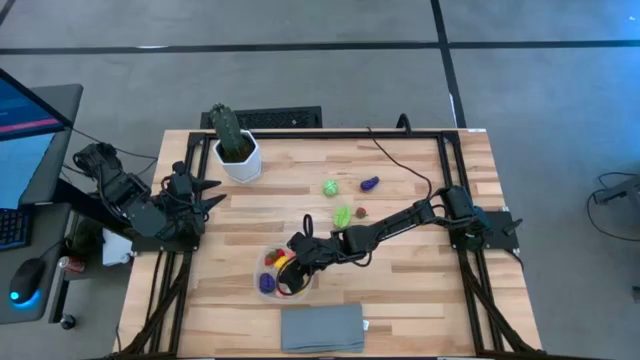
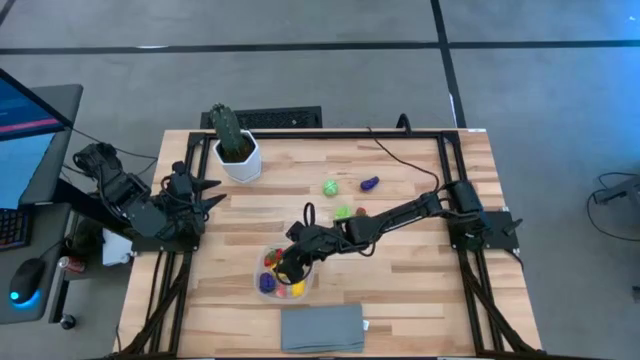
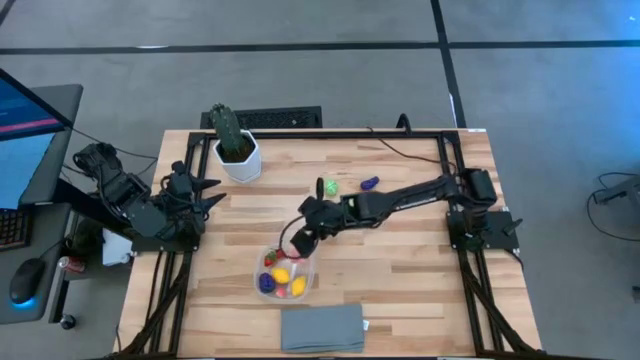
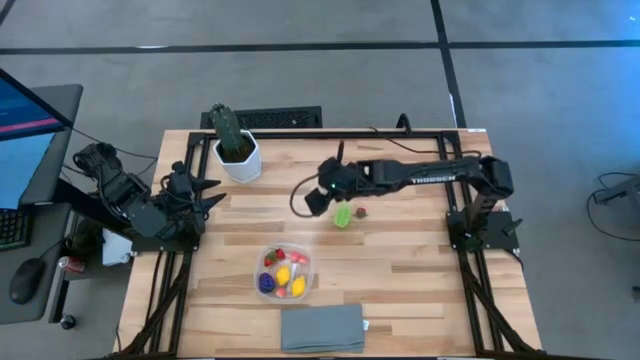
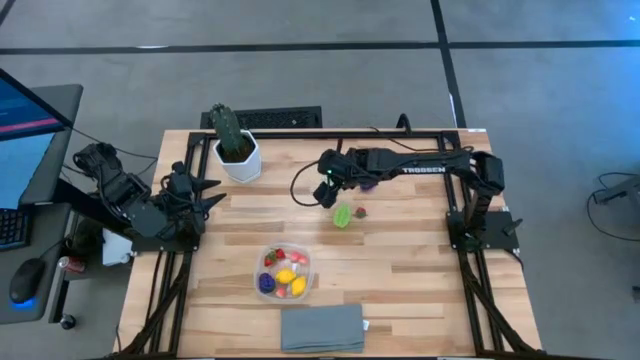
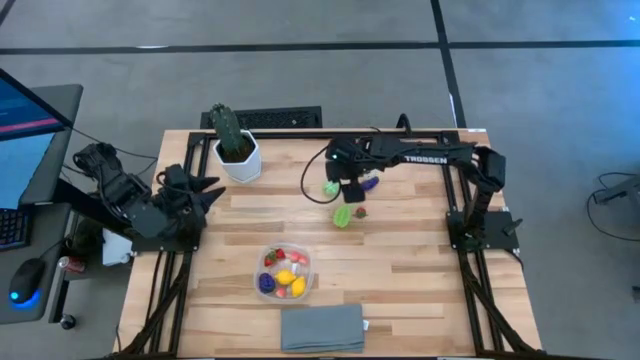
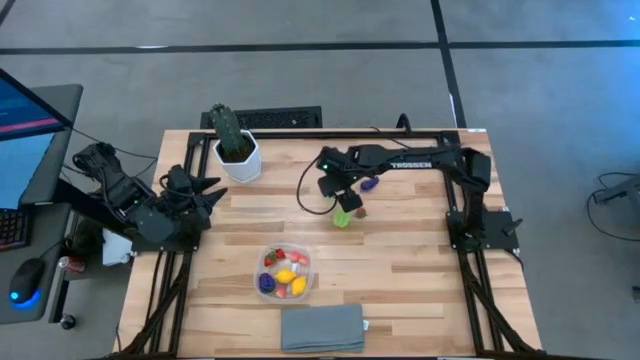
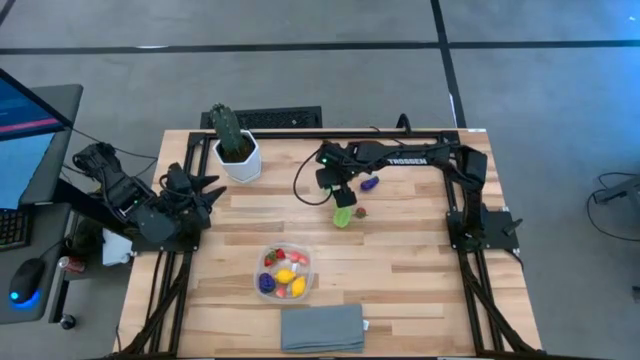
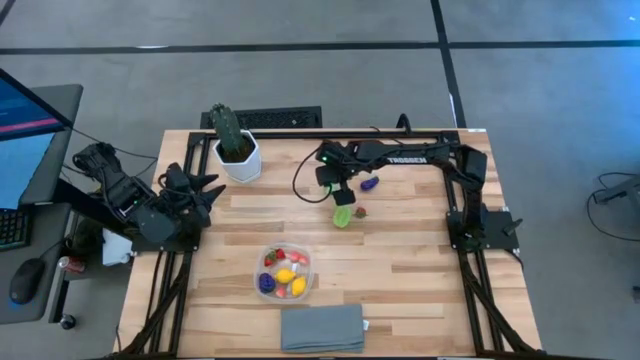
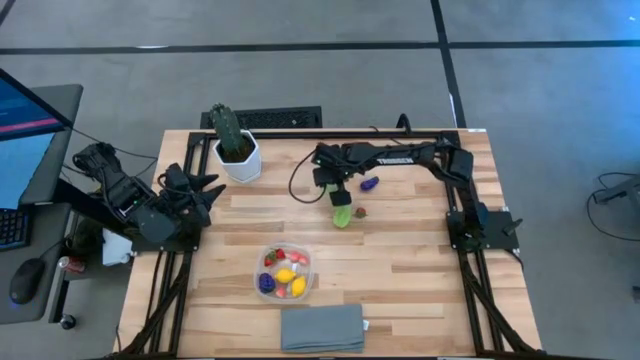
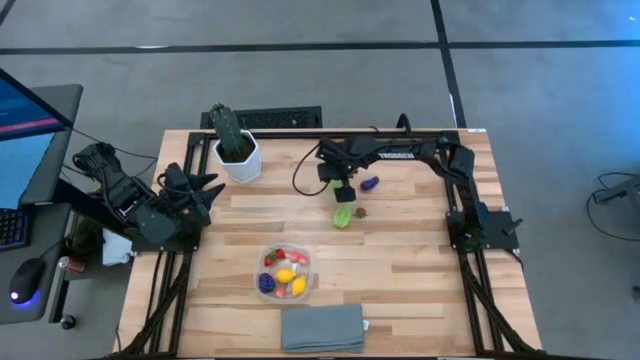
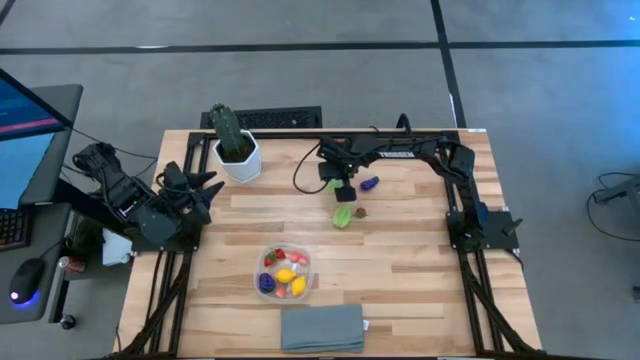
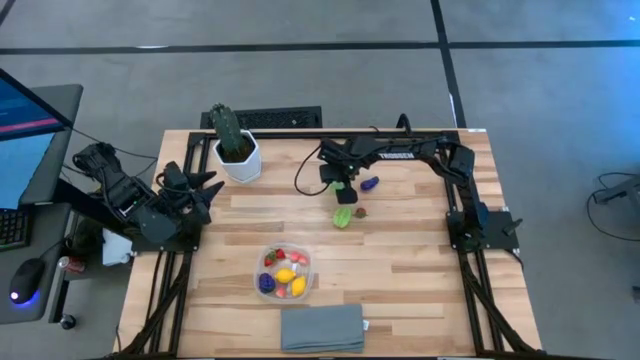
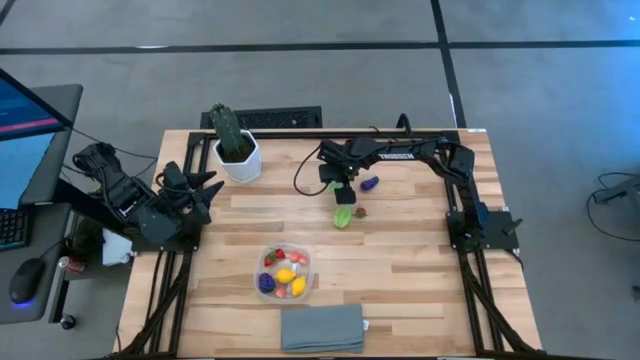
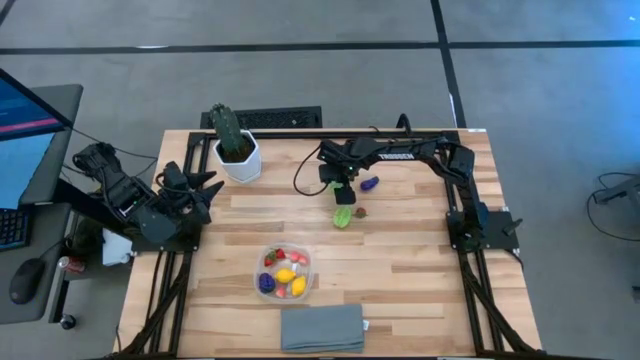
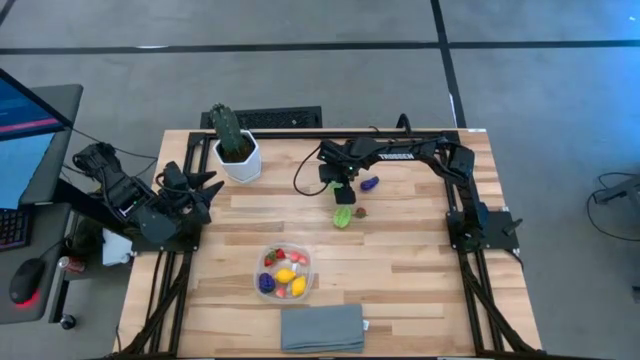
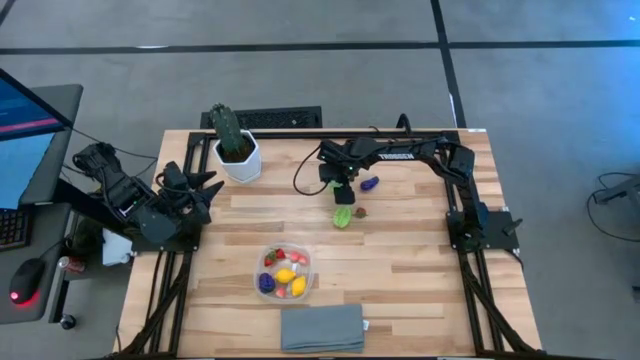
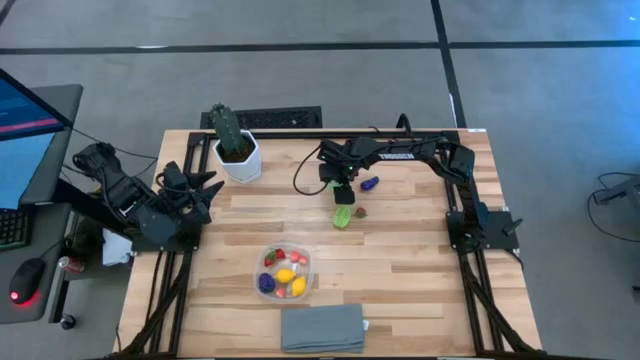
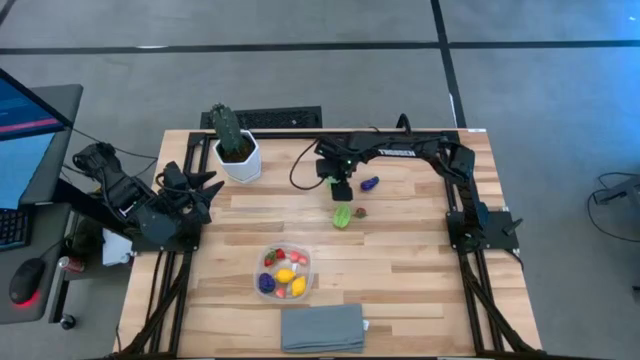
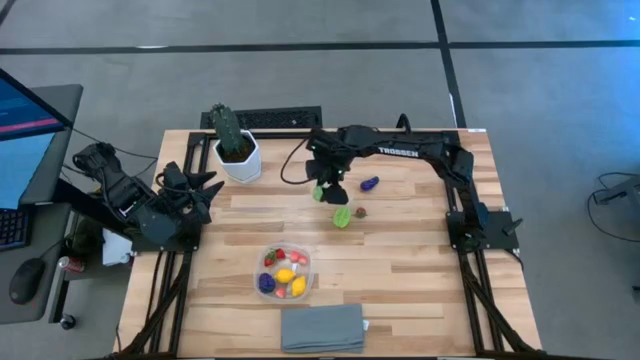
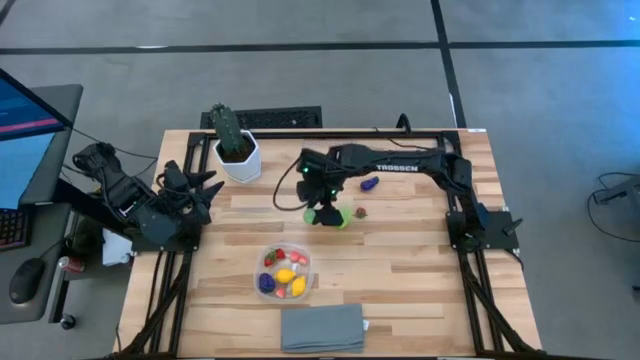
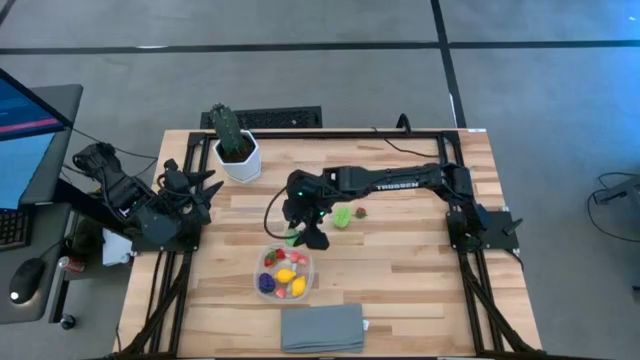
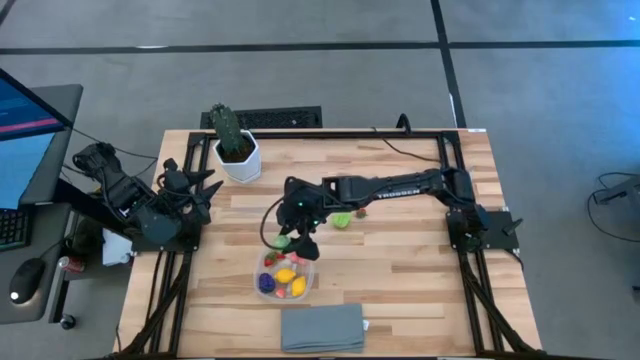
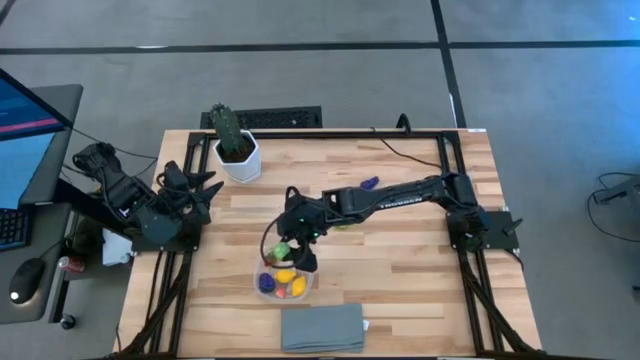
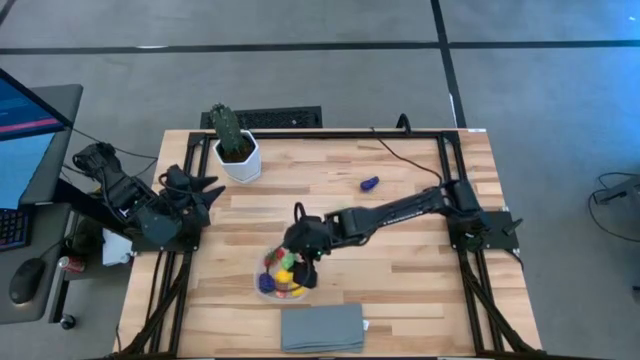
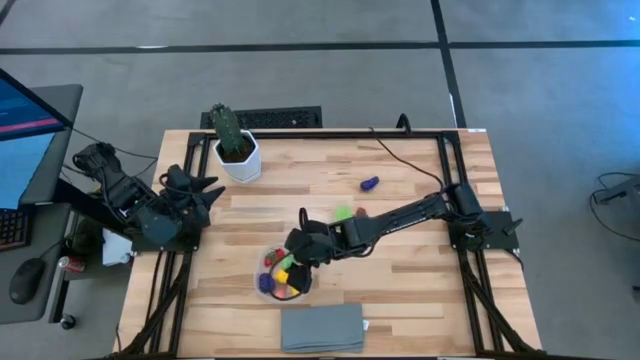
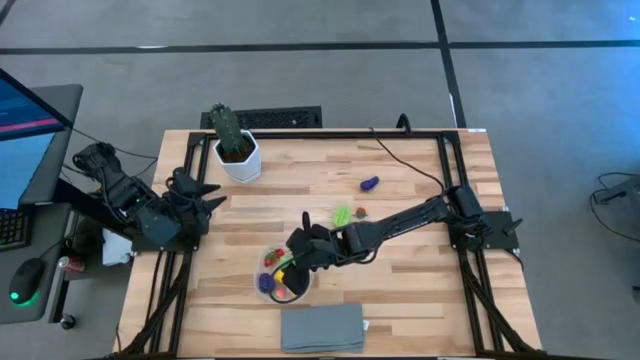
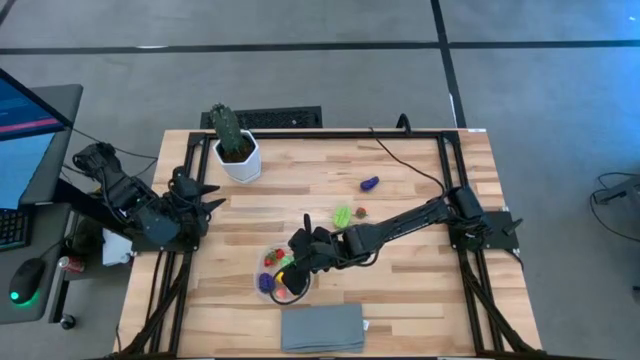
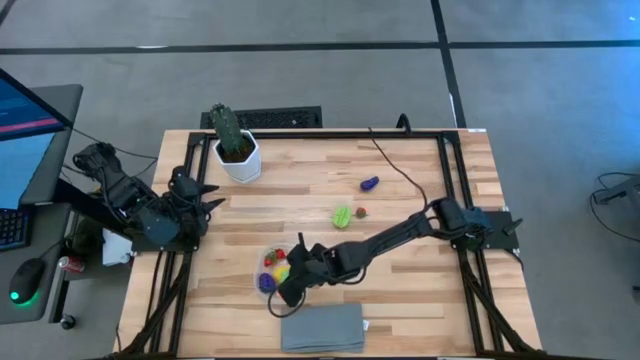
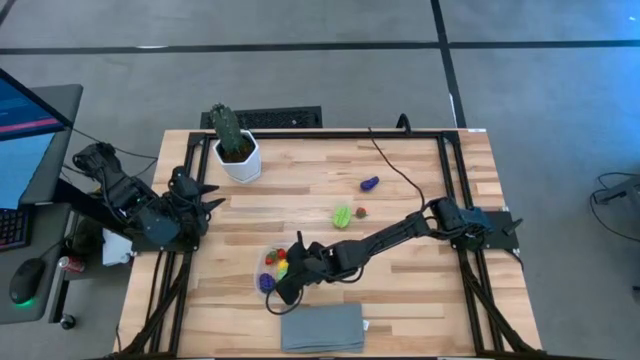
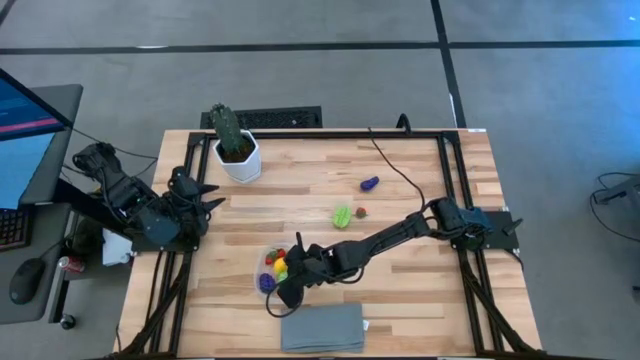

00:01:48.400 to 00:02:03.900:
Task: Pick and placing Produce into tupperware
Put the cabbage into the transparent bin

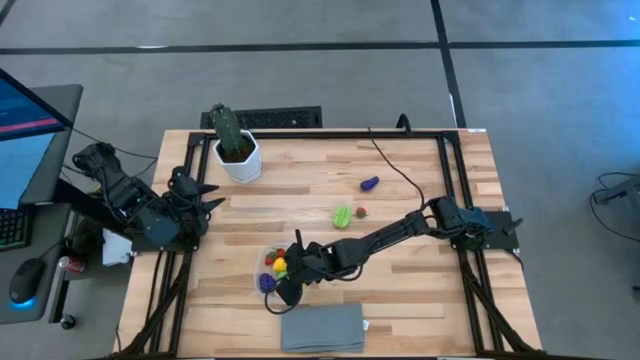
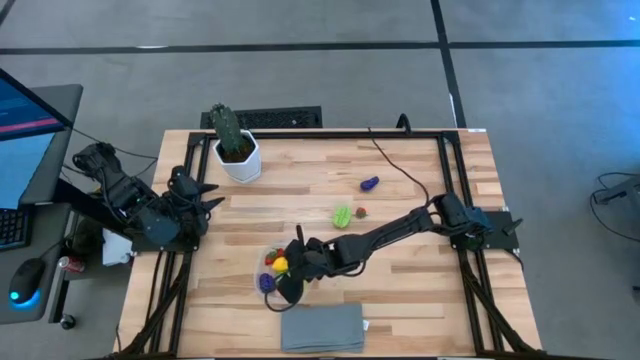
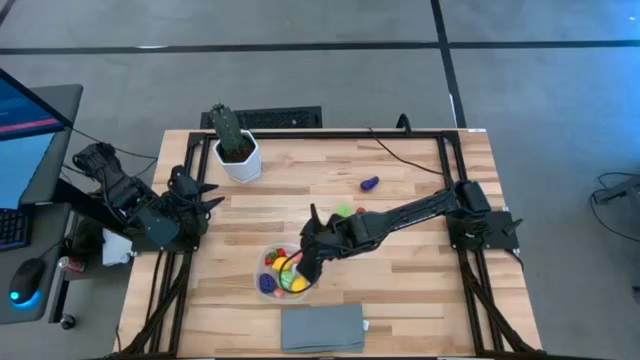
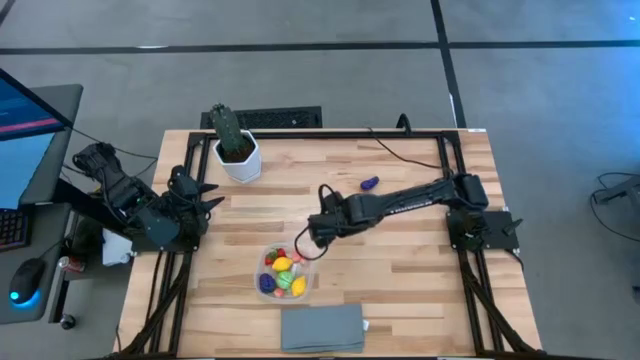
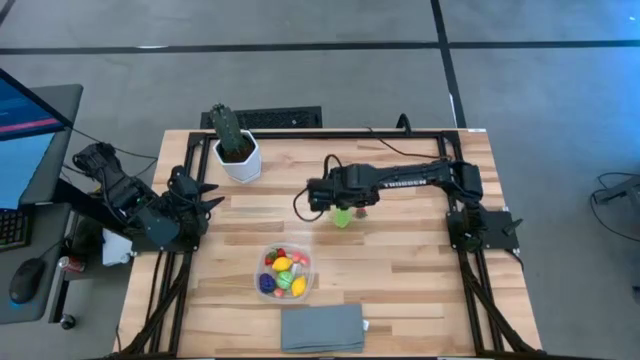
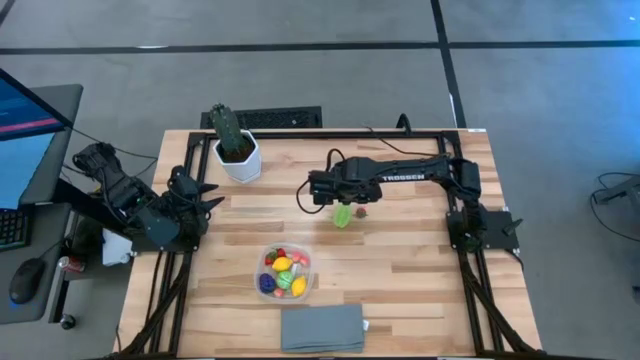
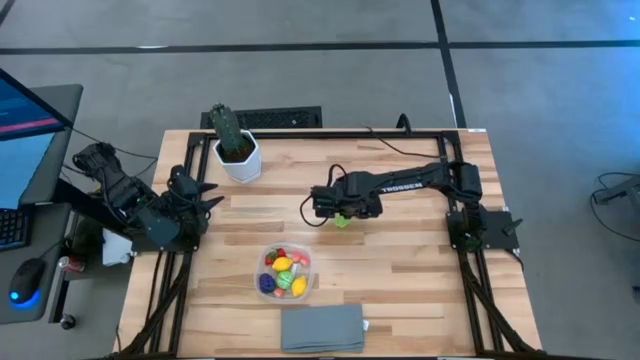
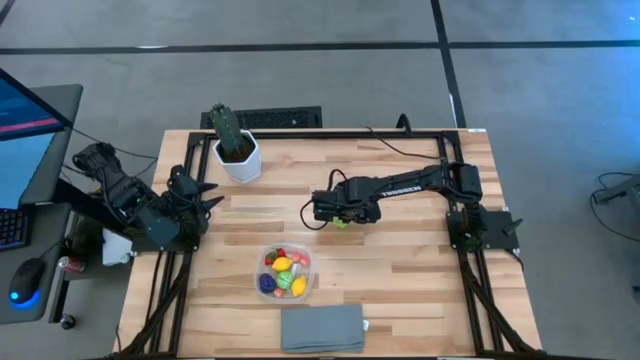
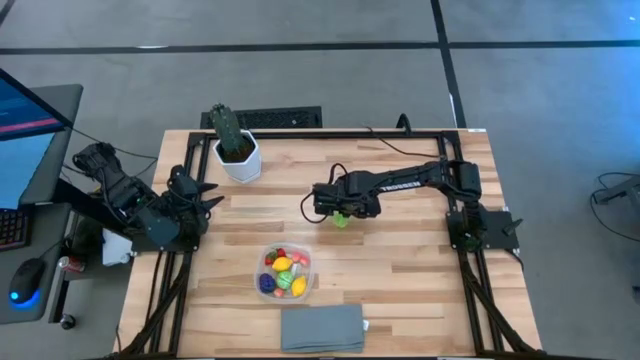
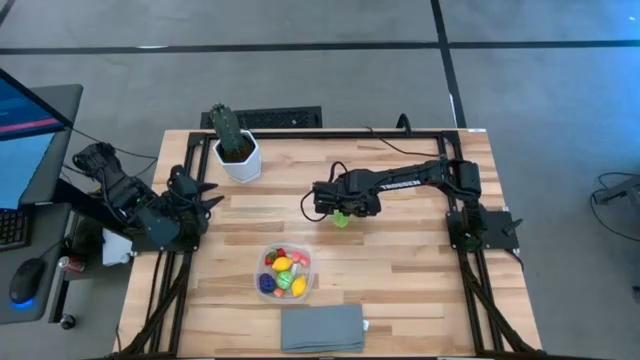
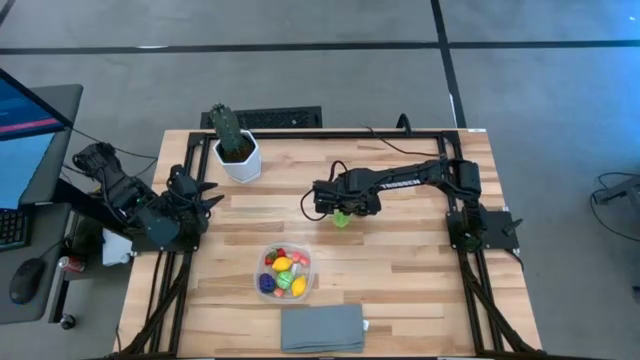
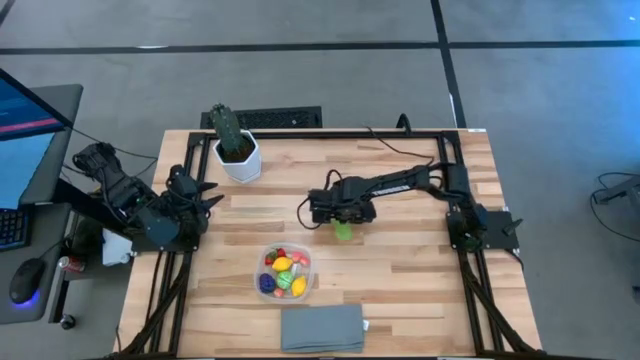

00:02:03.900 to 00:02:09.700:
Put the starfruit into the transparent bin
